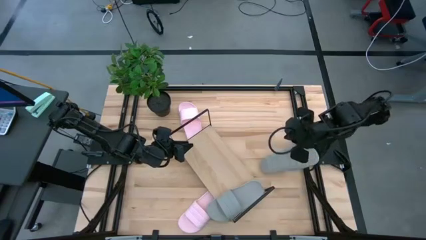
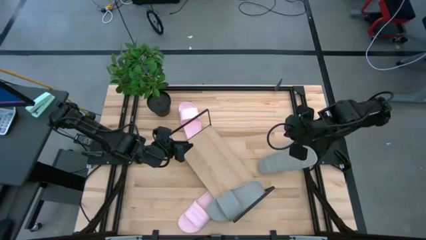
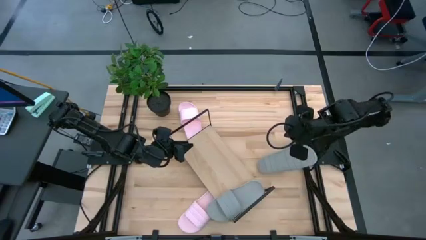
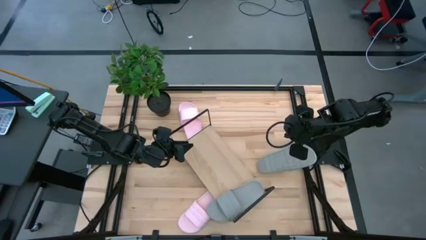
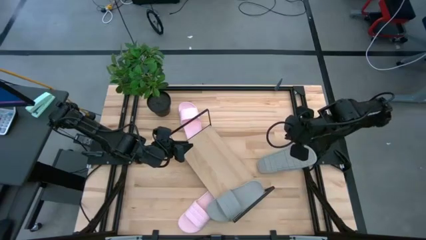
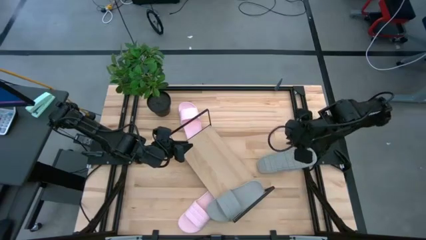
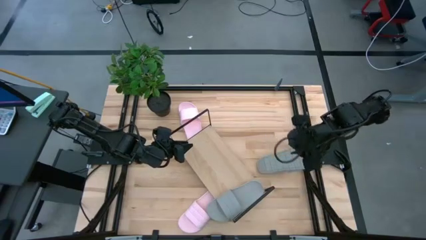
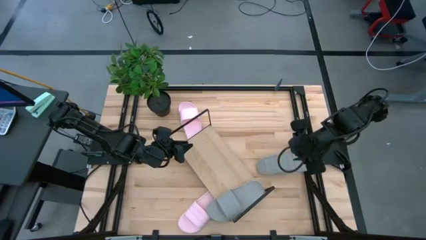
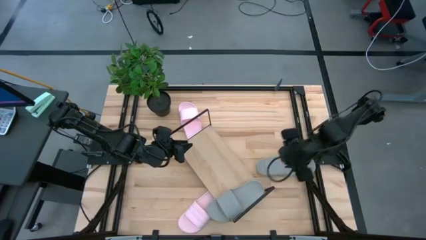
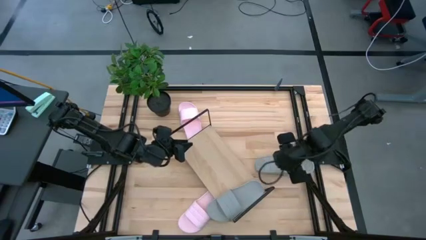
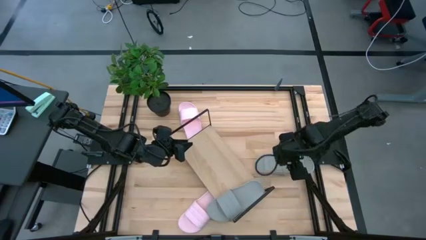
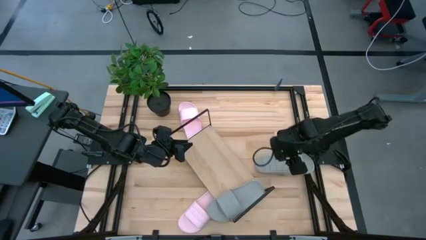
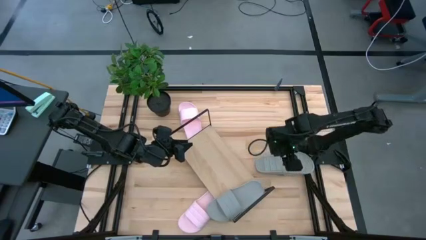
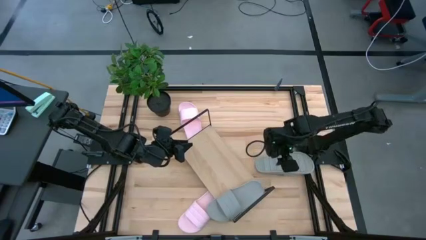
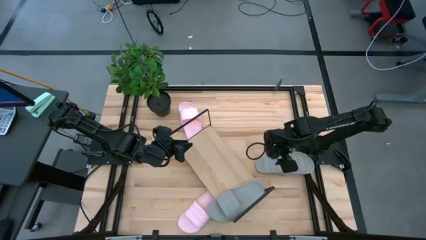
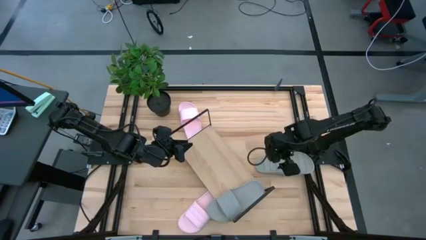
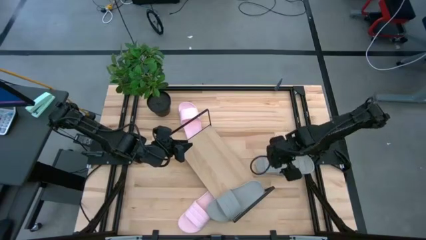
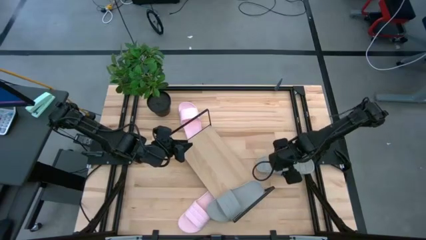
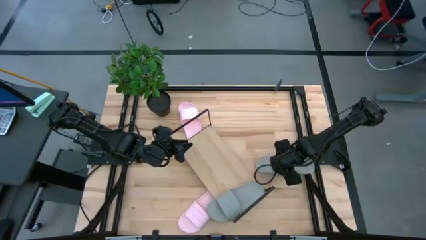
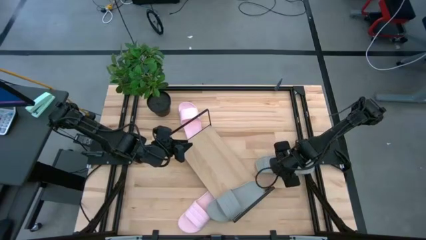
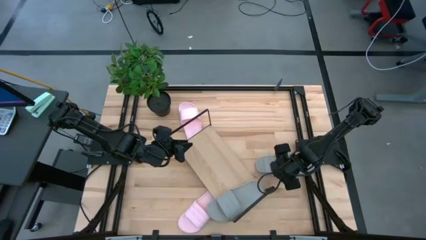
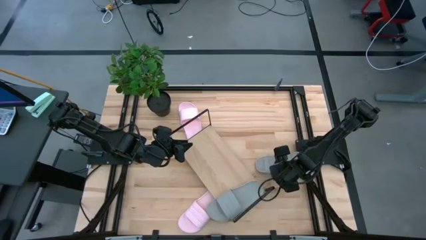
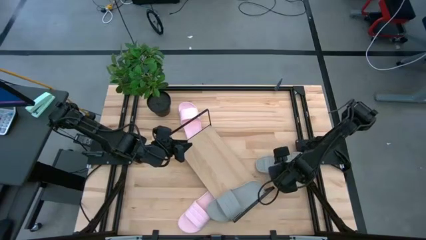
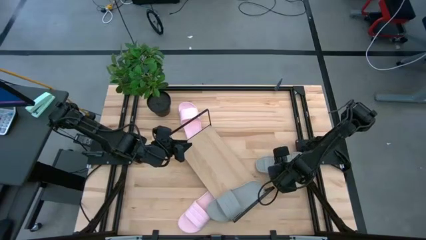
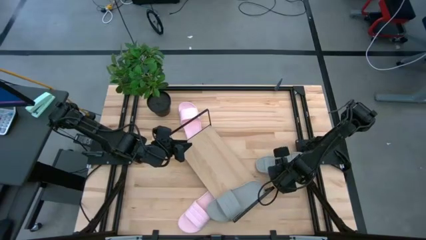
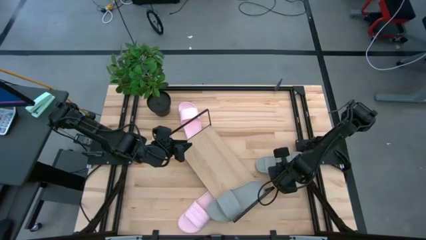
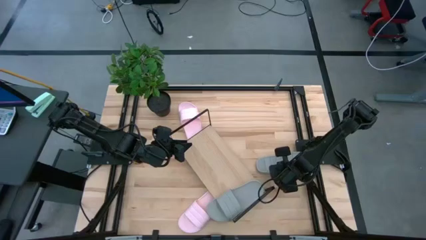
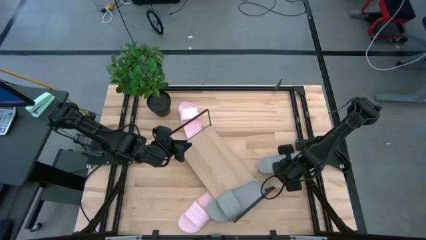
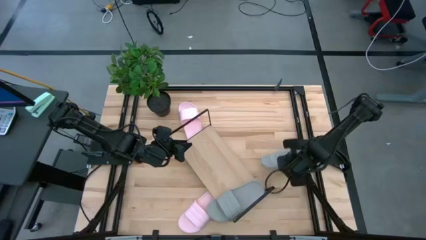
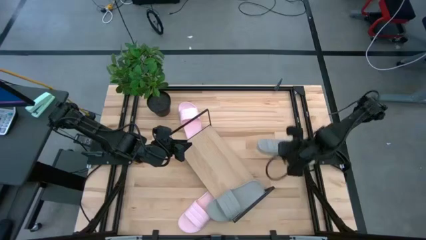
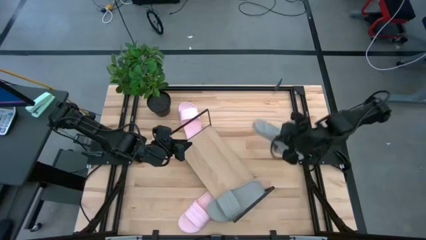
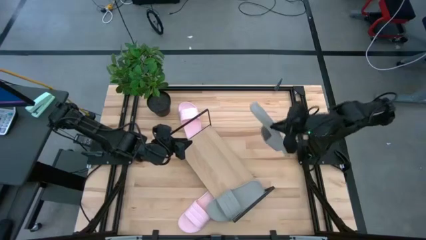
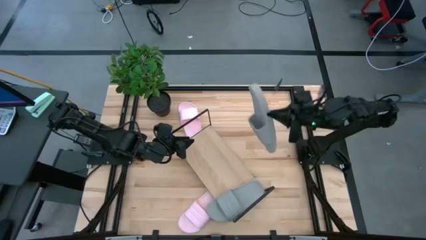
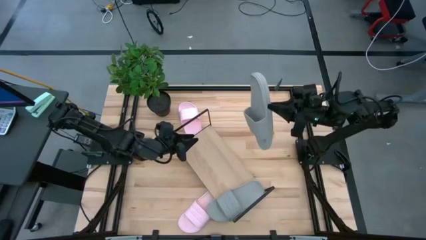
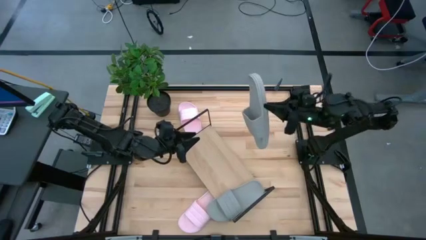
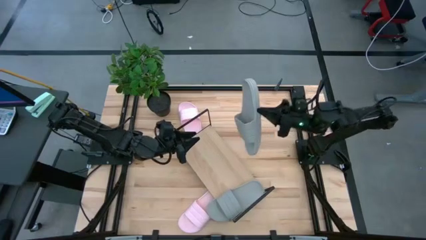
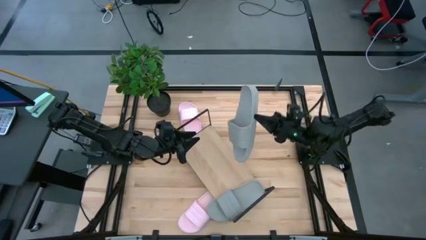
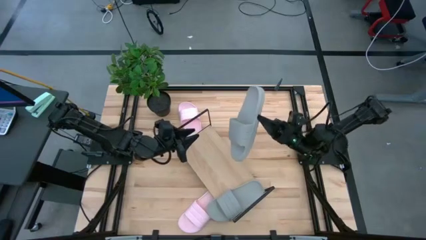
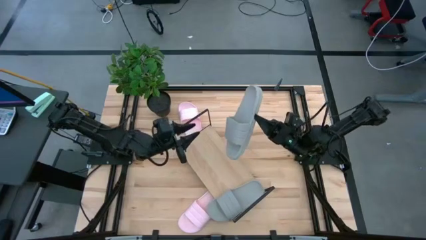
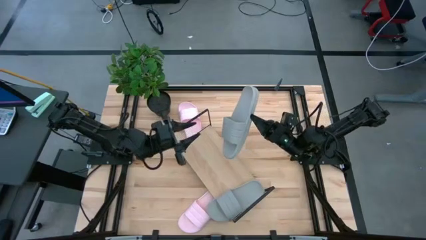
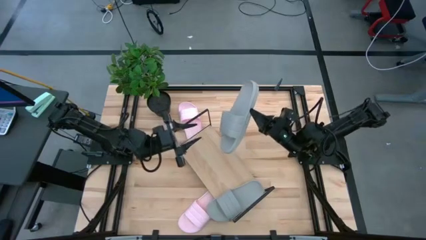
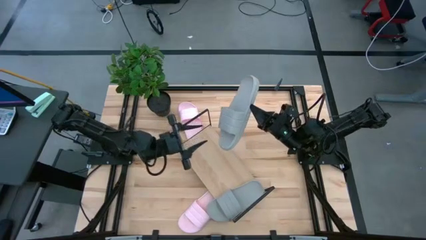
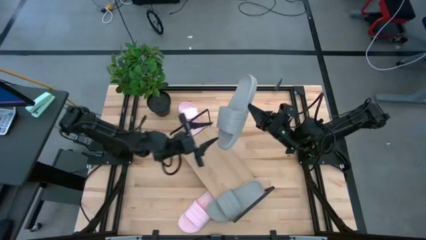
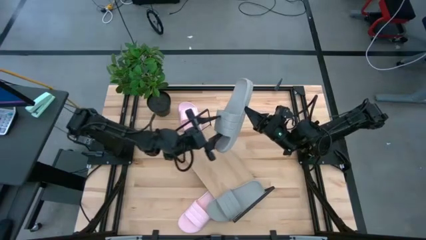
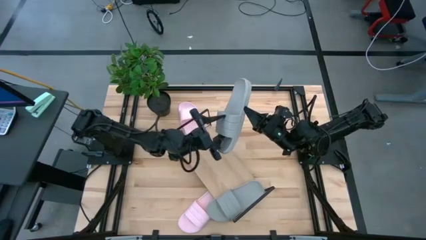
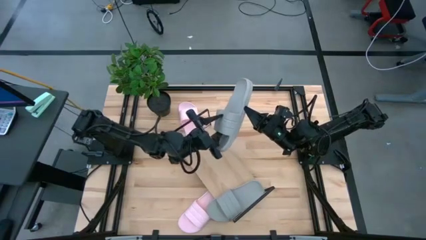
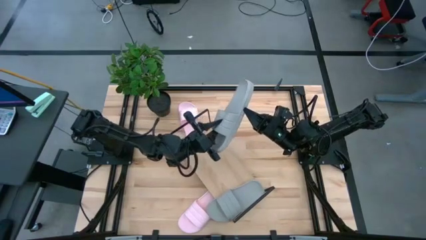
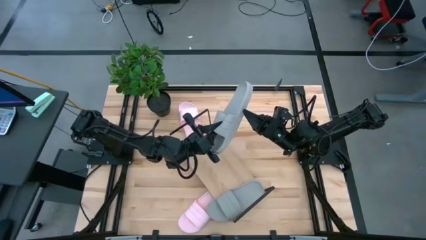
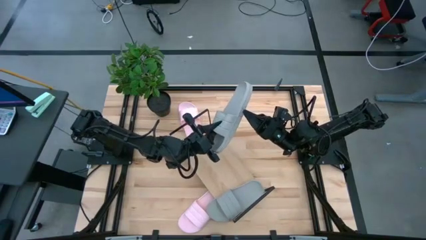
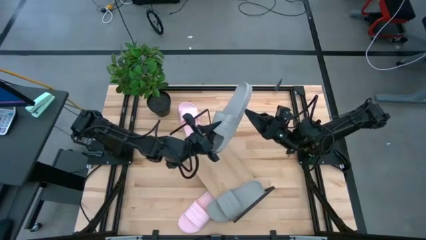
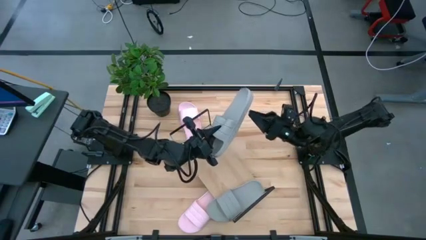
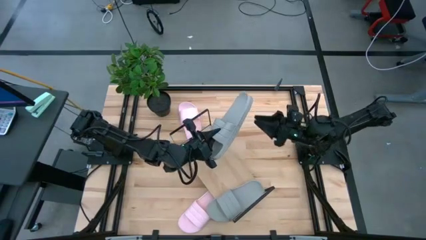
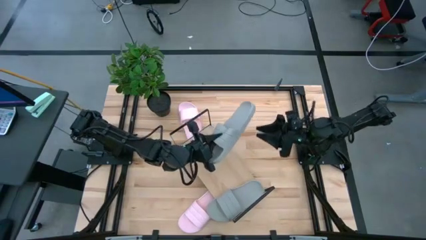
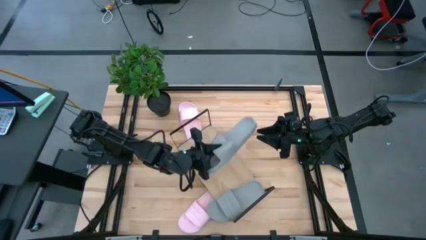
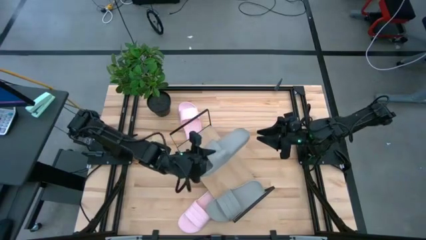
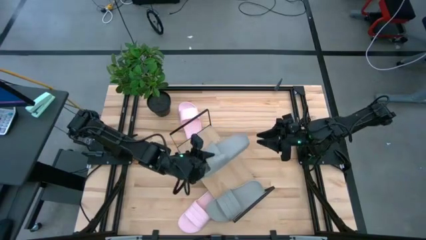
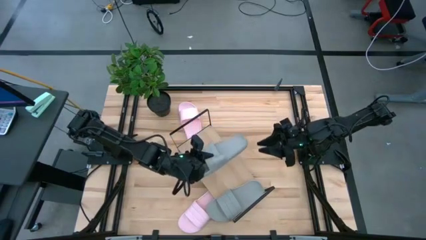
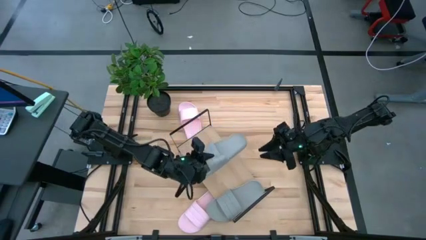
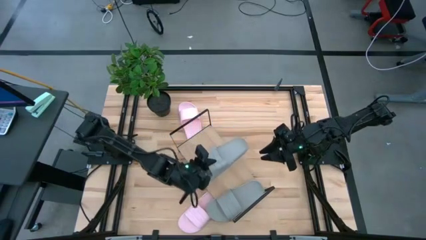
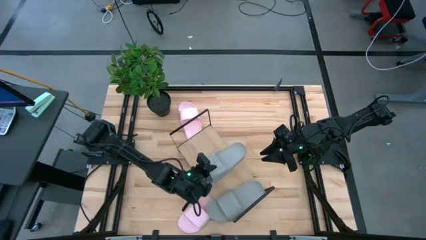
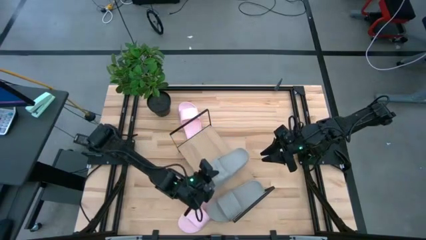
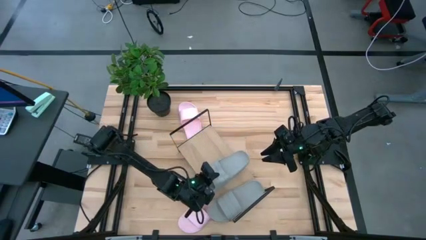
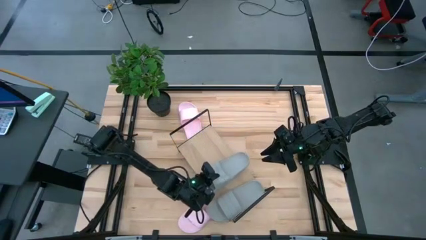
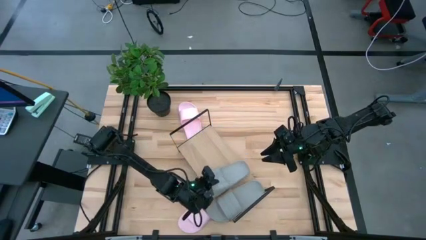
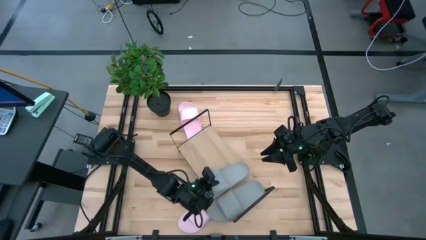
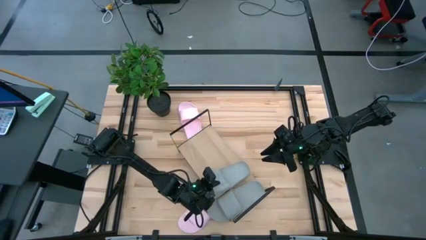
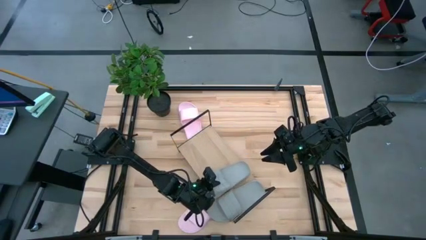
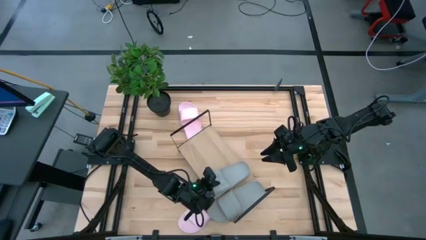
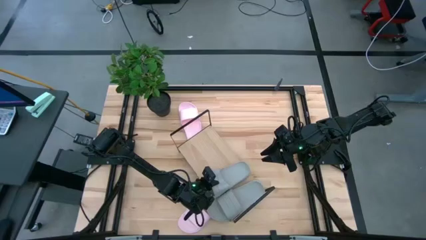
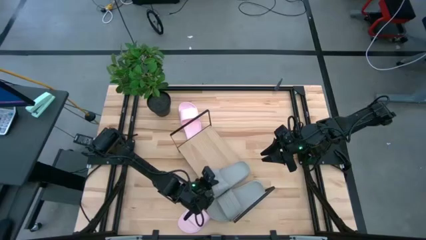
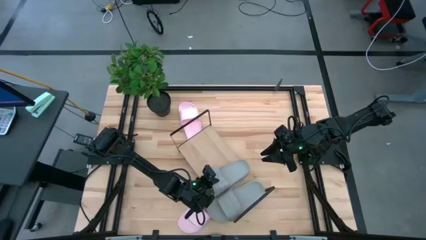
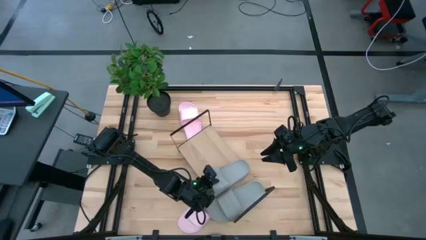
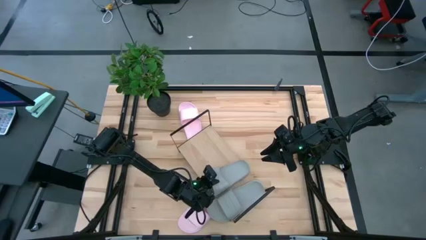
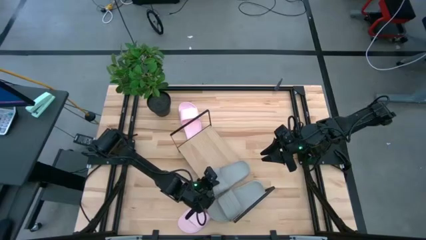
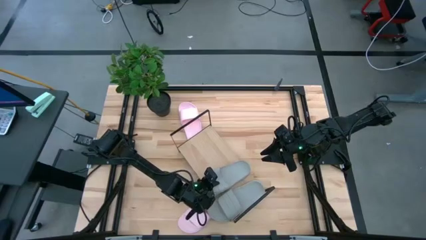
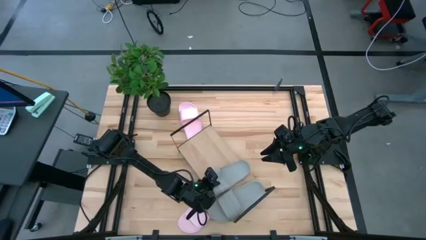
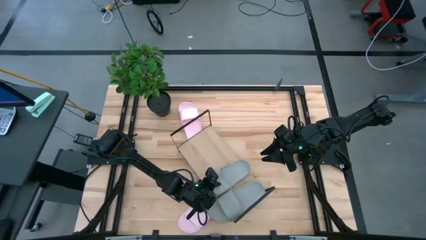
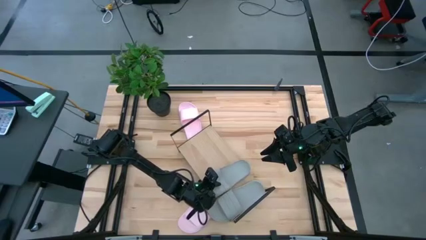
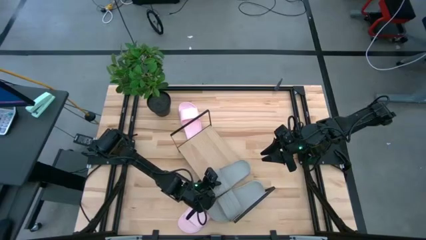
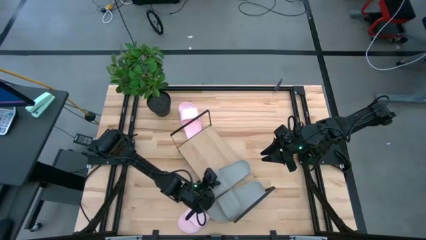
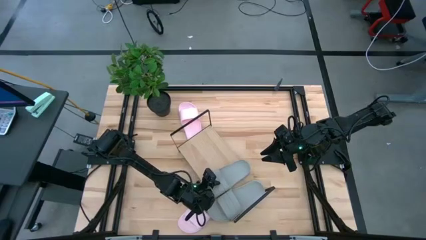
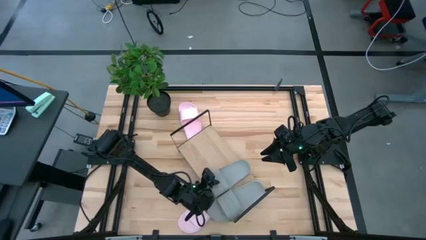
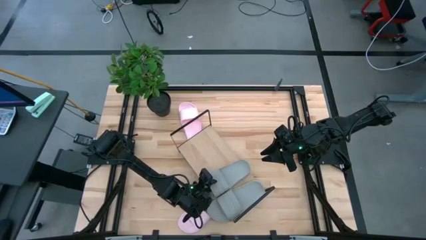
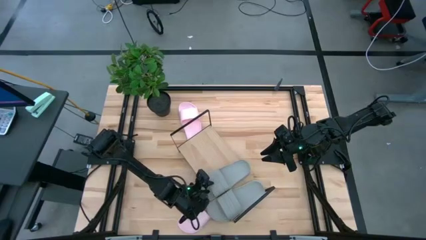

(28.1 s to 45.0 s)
Task: Pick and place slides into the shelf
Put the gray slide on the shelf
